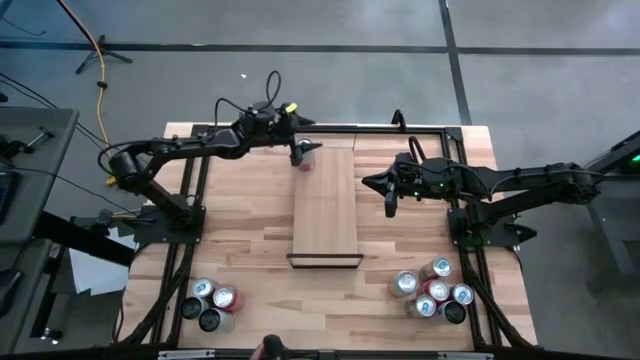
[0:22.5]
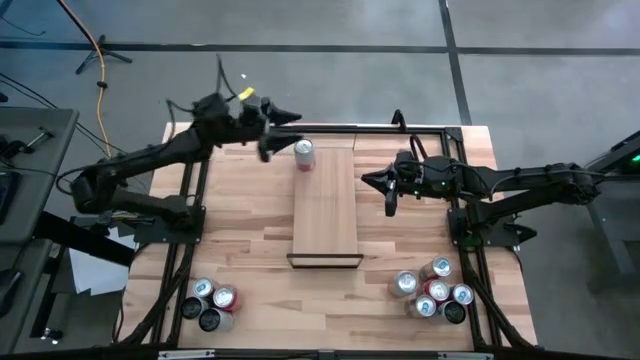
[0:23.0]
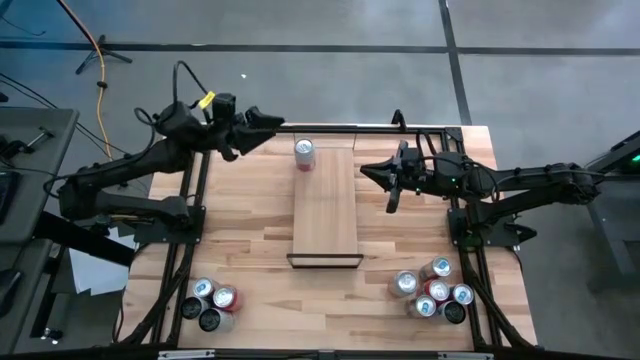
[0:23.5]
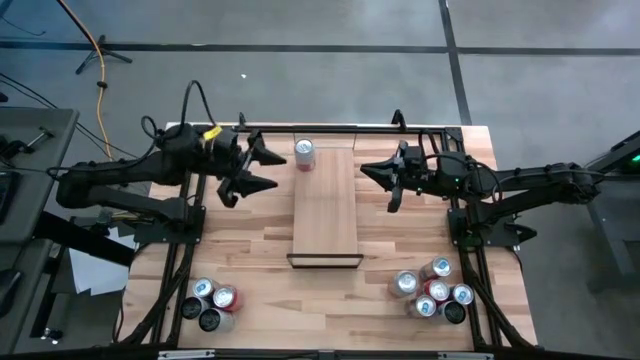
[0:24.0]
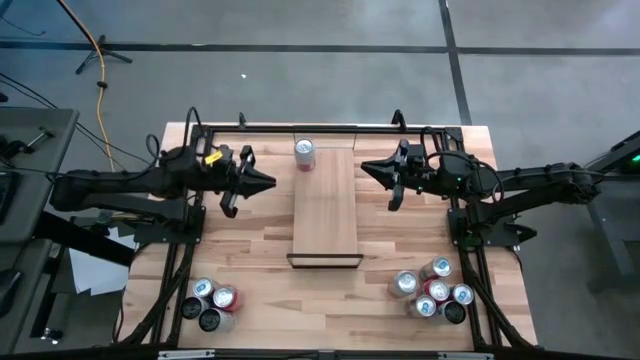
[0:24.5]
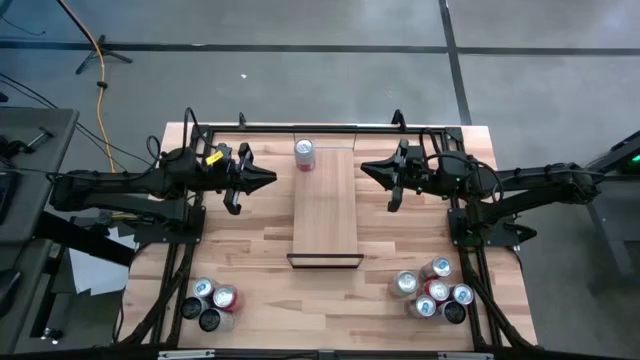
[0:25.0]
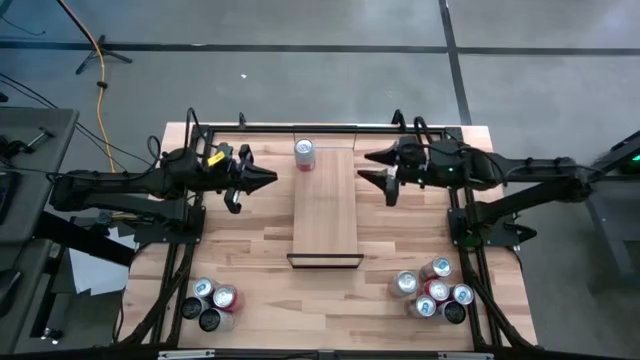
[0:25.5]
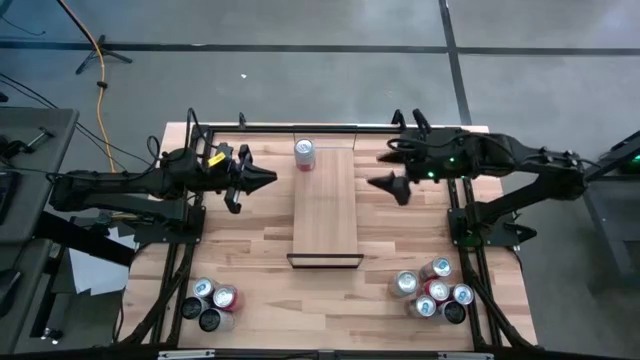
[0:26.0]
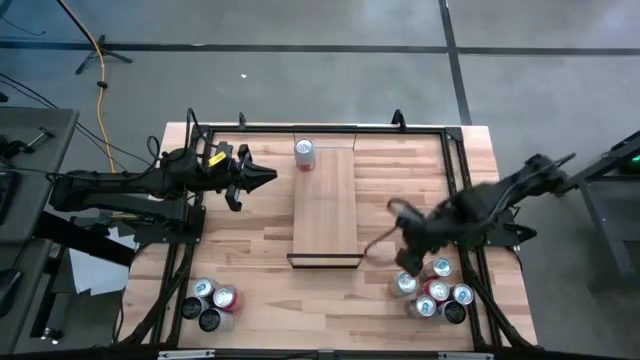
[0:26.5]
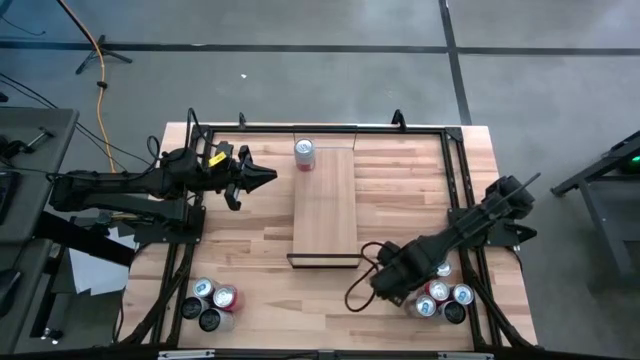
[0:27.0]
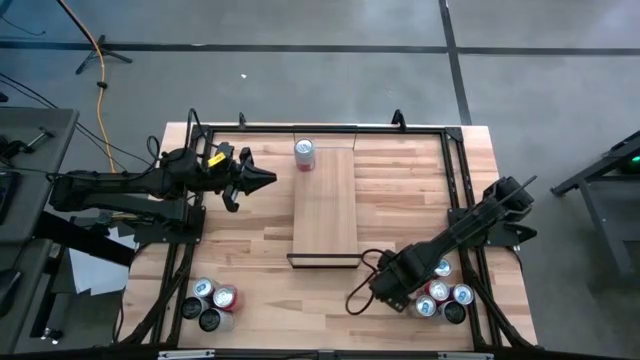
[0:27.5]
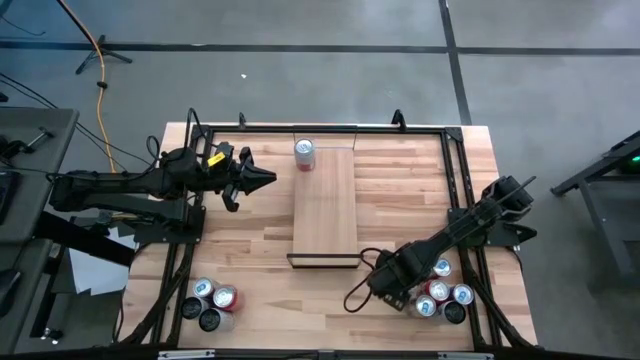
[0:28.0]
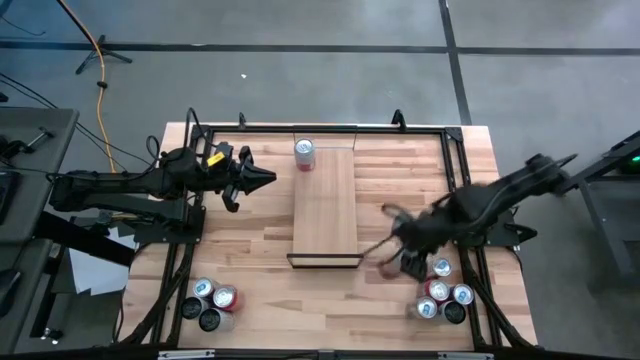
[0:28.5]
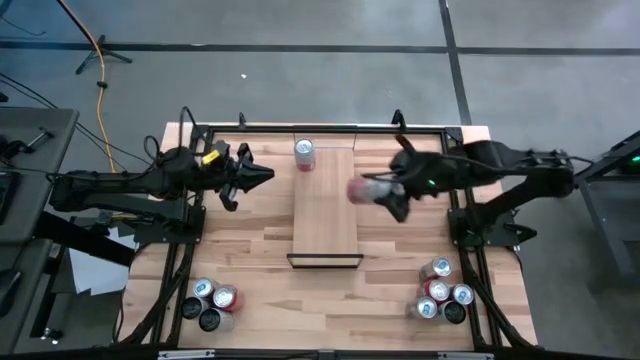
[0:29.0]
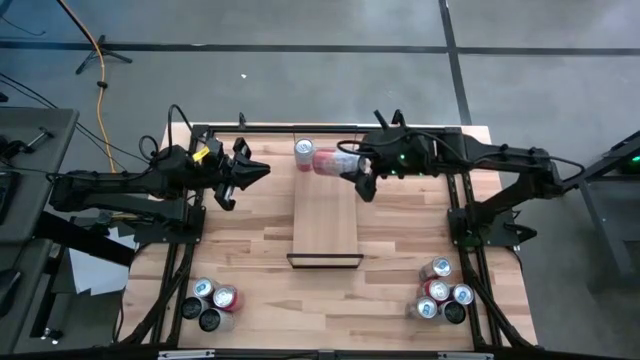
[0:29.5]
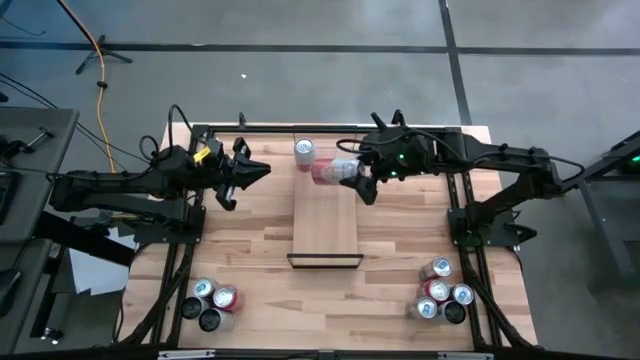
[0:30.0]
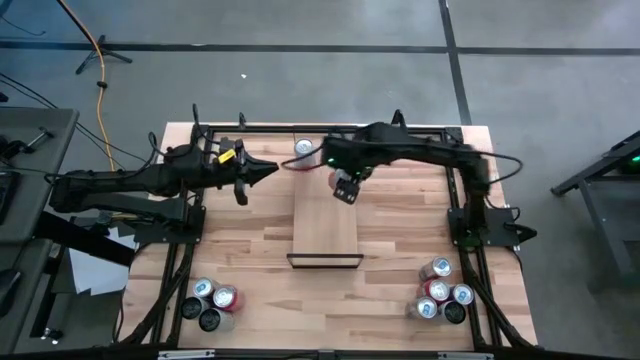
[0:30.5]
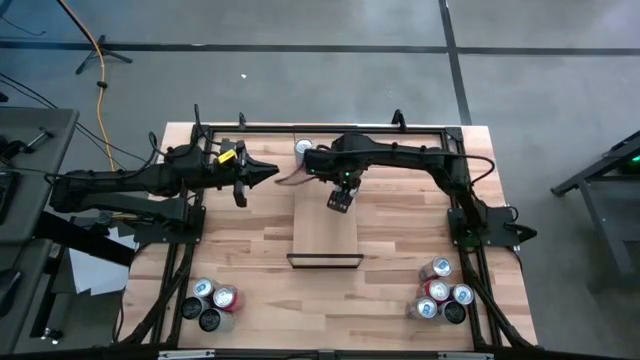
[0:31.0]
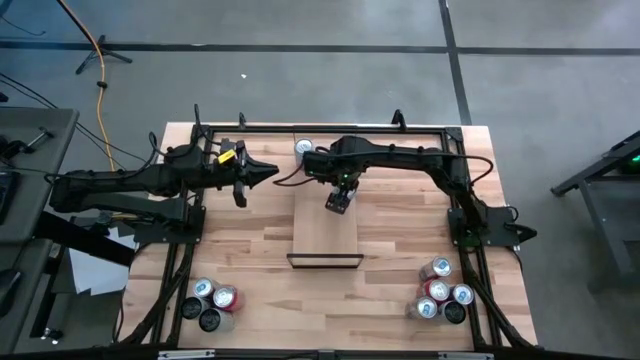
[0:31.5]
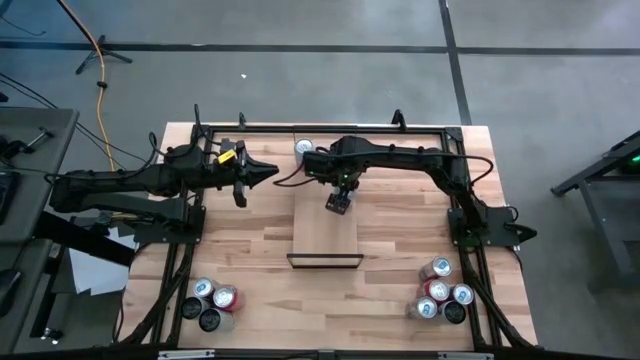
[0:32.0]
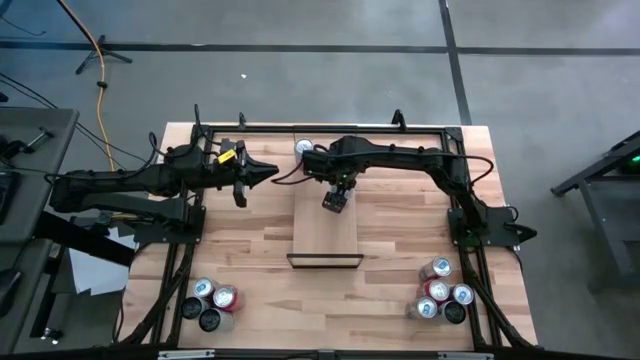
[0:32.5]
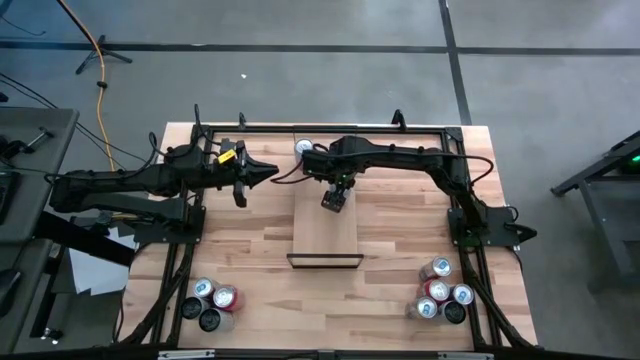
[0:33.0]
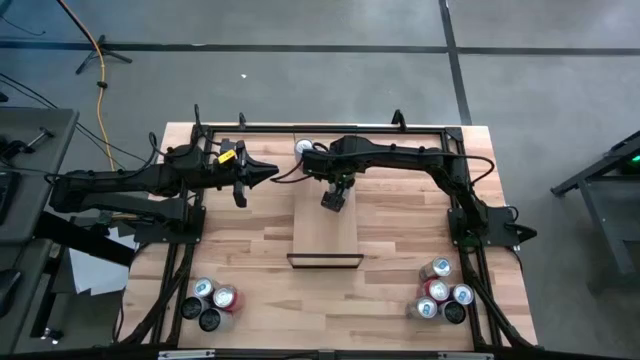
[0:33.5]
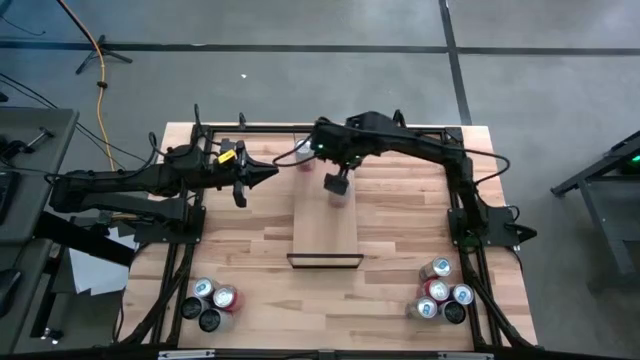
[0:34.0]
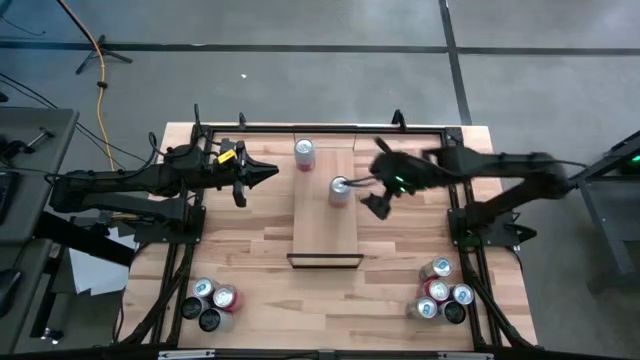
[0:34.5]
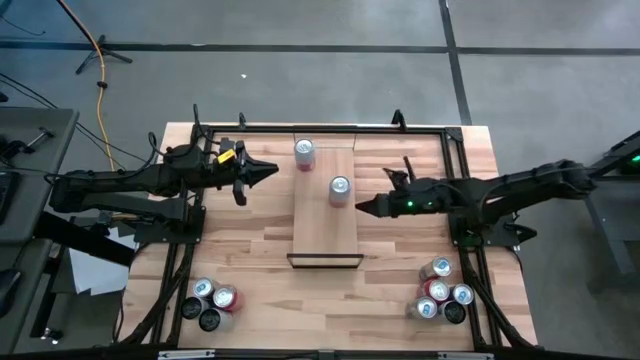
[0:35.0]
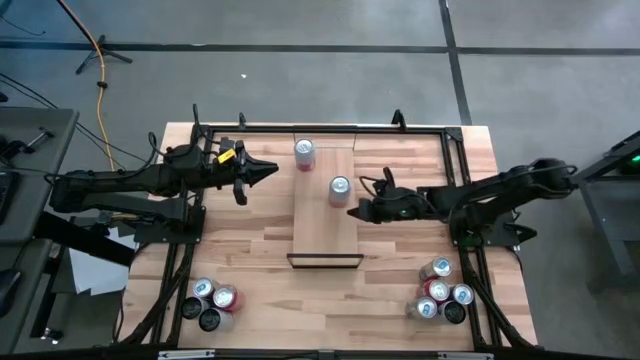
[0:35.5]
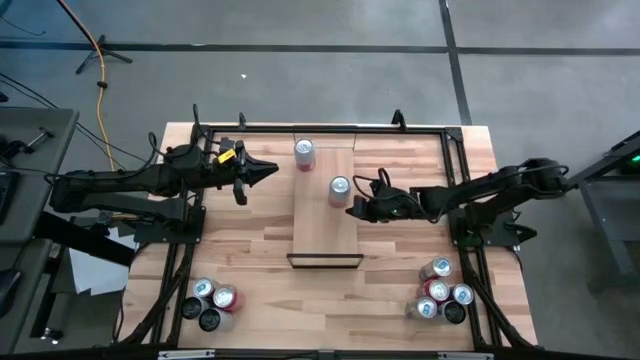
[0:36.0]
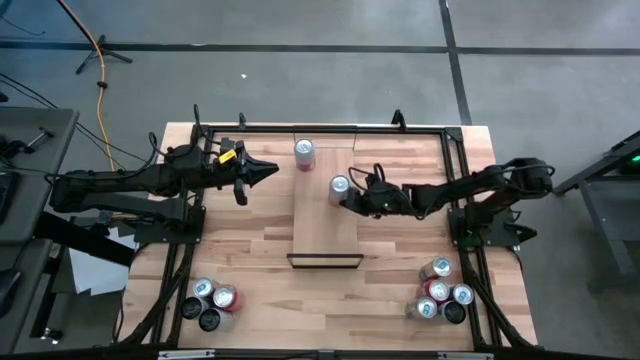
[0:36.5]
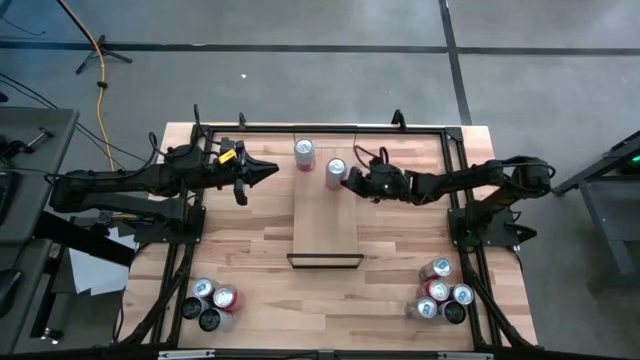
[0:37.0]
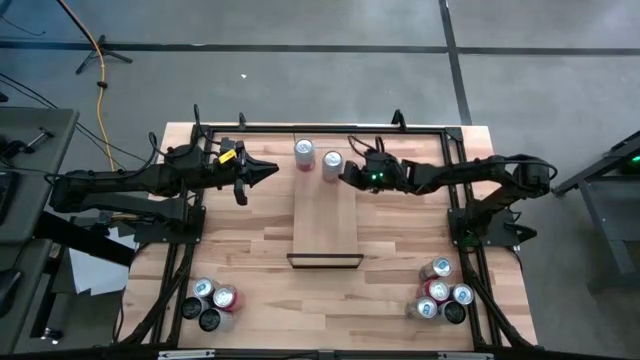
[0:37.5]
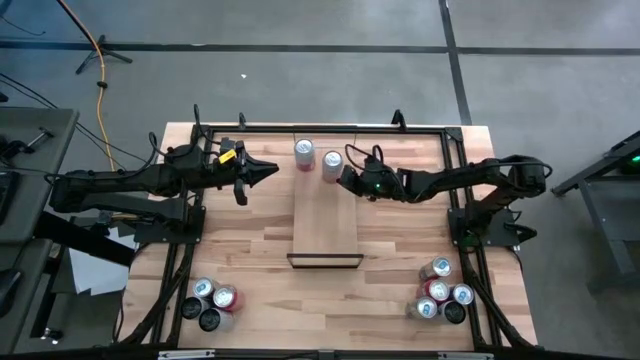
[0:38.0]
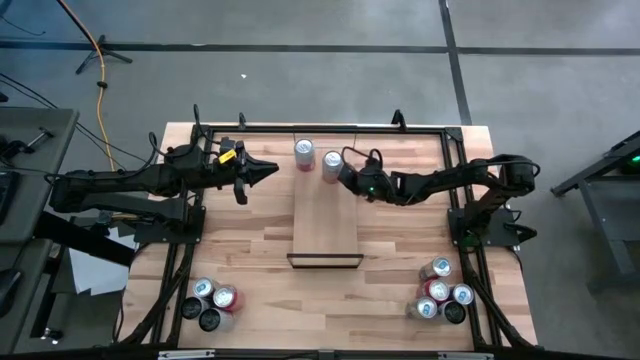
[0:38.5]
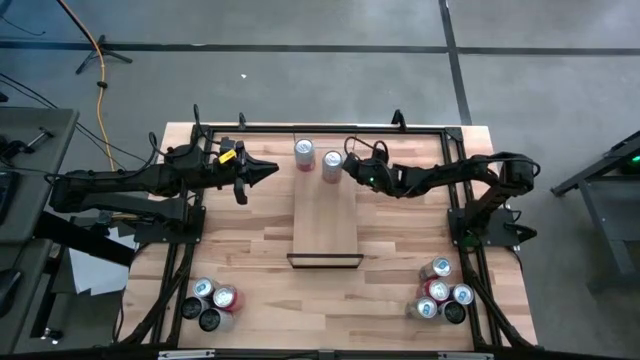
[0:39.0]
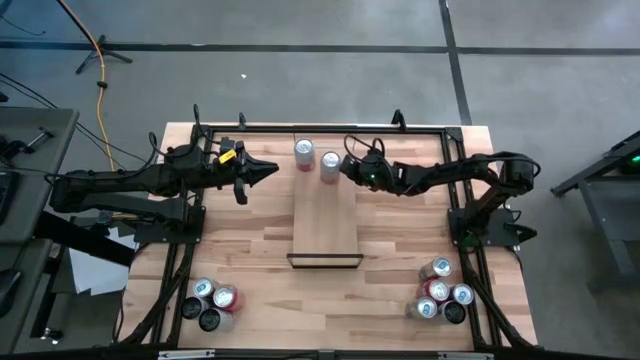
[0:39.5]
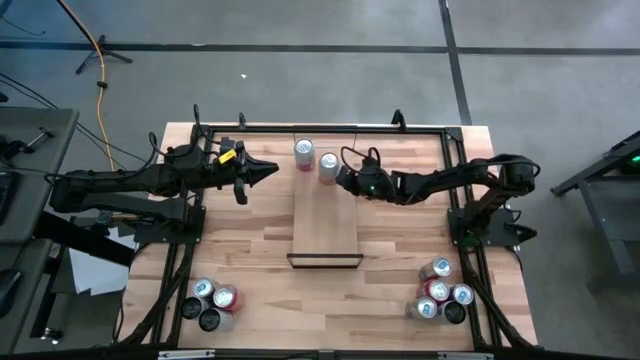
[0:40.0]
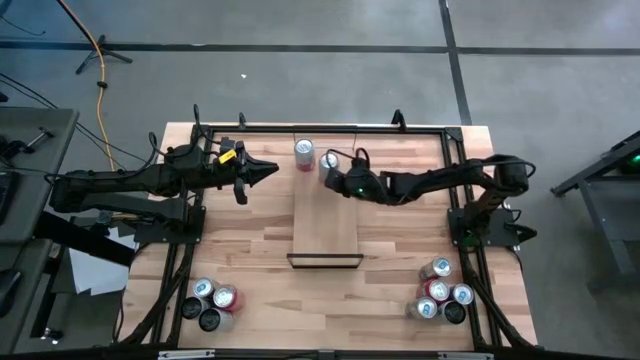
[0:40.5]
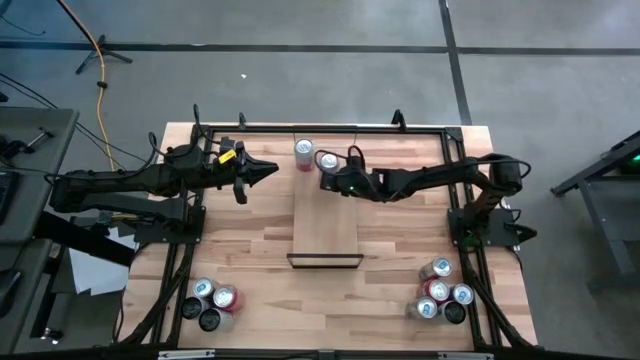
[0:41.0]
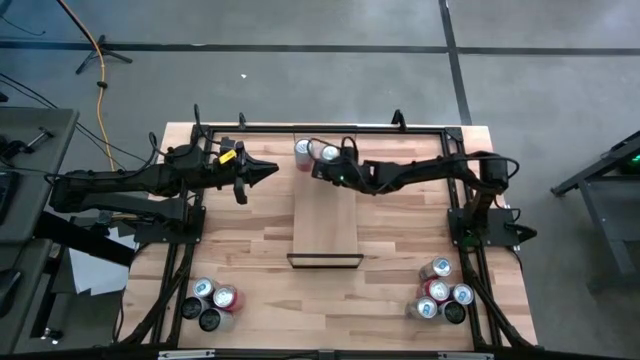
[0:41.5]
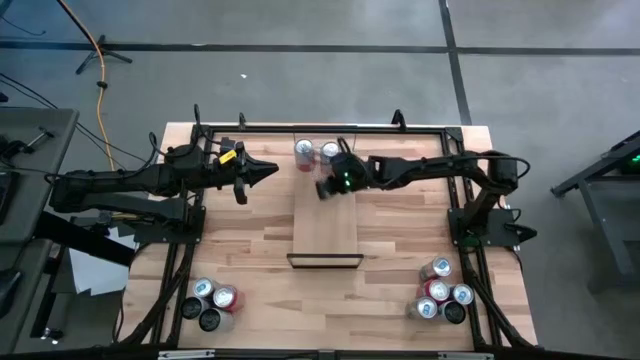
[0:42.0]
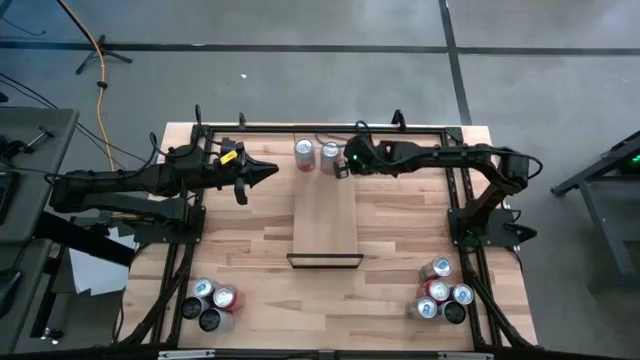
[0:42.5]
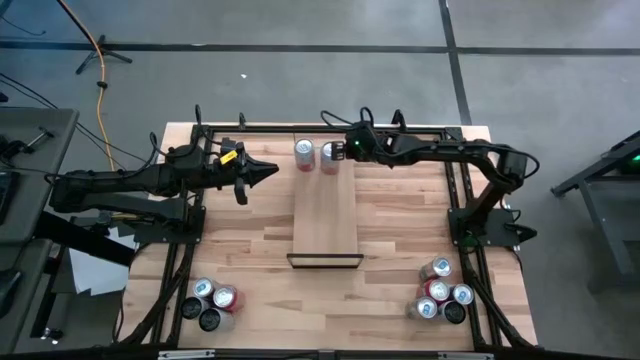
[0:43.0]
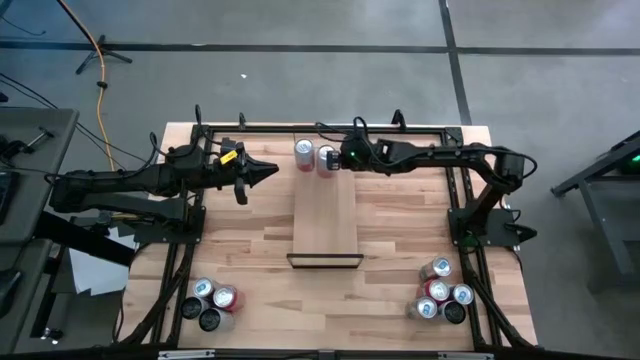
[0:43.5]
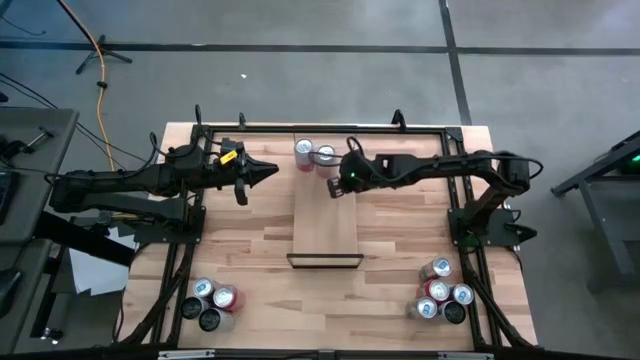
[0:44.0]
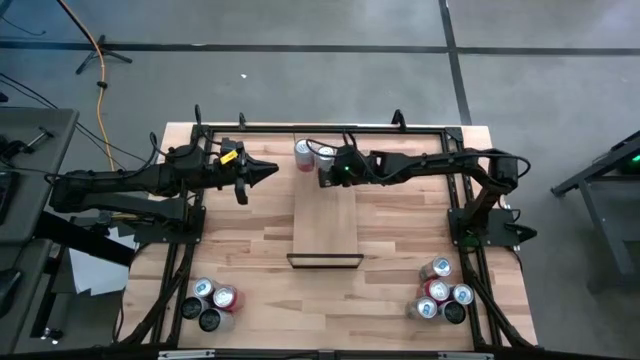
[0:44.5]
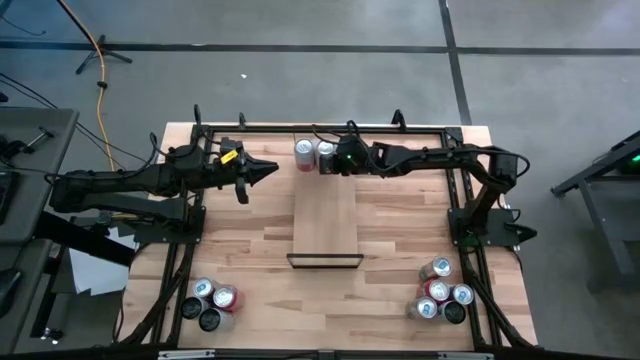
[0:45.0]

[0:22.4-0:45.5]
Task: Place canned beverage on shelf
Put the orange soda can on the shelf aligned with the pink soda can
